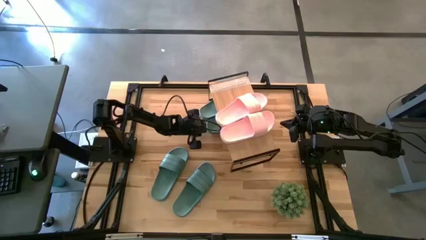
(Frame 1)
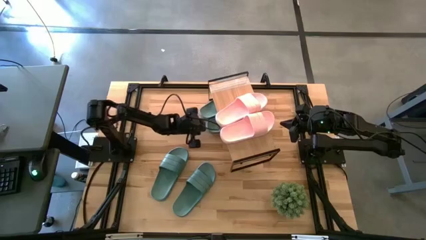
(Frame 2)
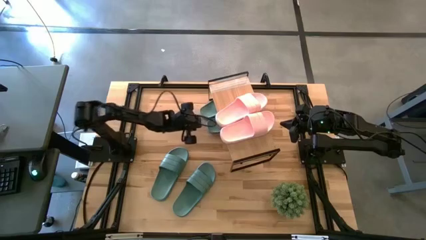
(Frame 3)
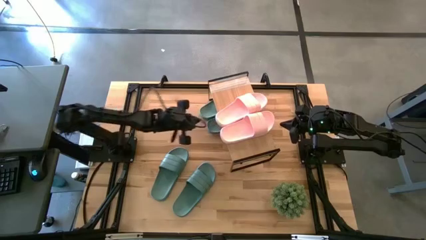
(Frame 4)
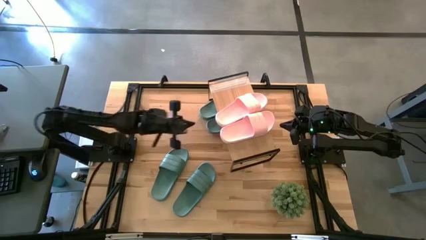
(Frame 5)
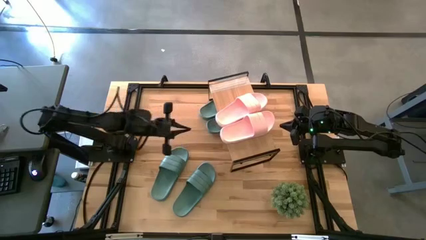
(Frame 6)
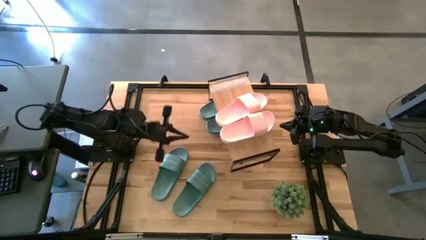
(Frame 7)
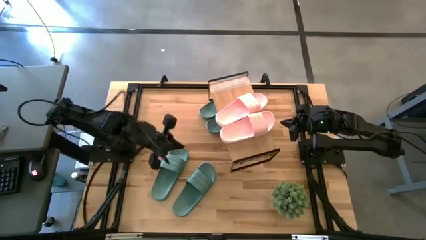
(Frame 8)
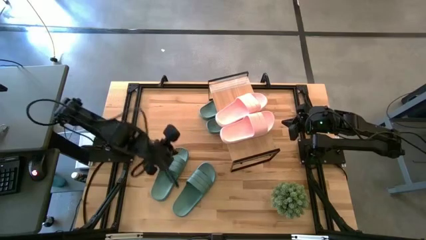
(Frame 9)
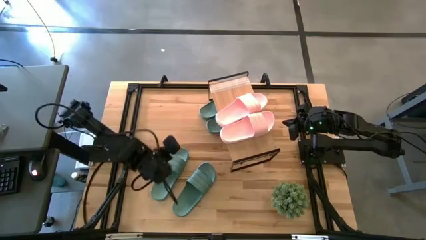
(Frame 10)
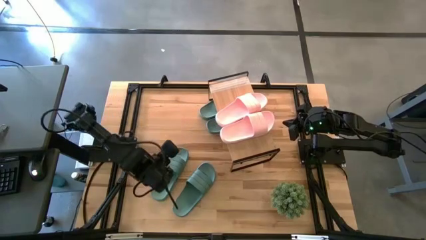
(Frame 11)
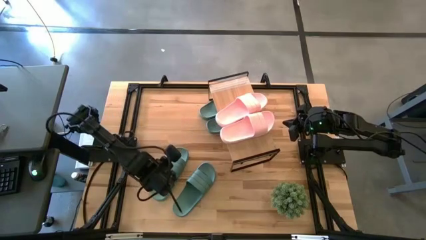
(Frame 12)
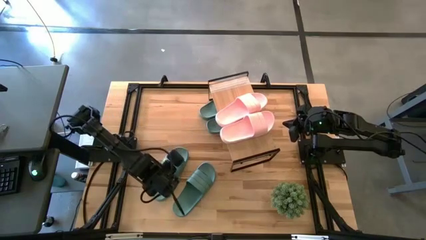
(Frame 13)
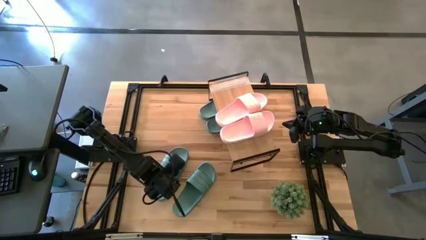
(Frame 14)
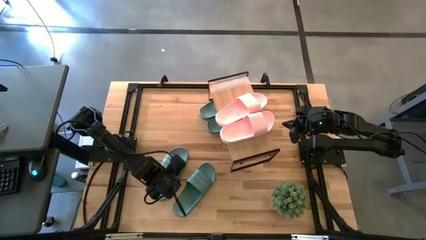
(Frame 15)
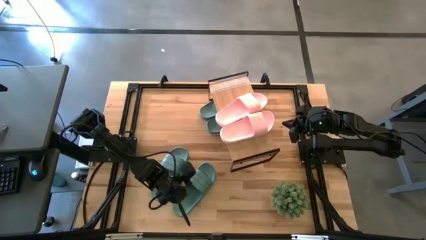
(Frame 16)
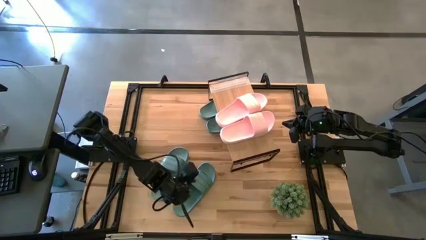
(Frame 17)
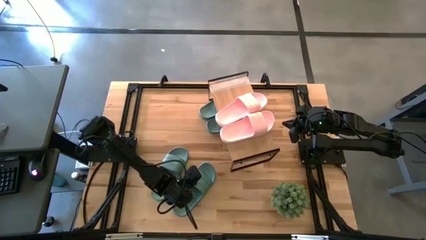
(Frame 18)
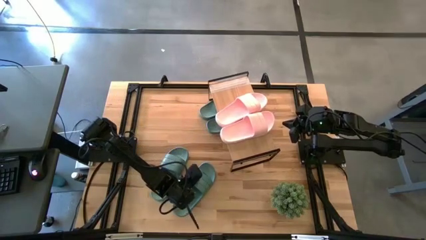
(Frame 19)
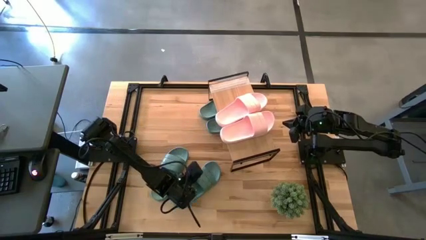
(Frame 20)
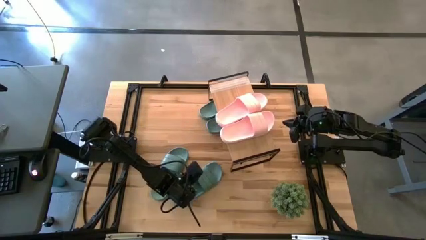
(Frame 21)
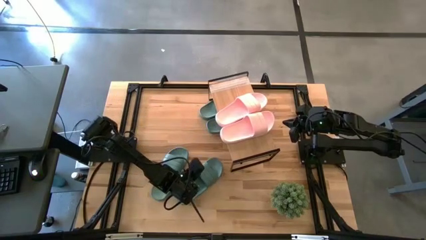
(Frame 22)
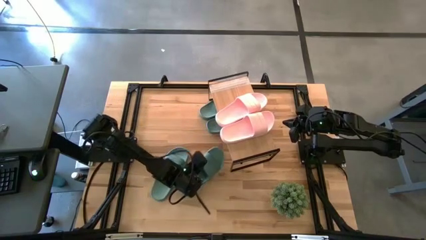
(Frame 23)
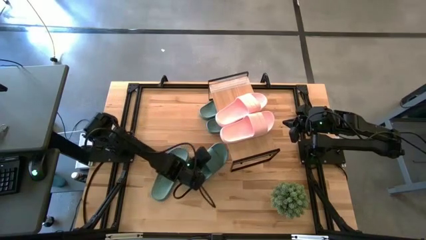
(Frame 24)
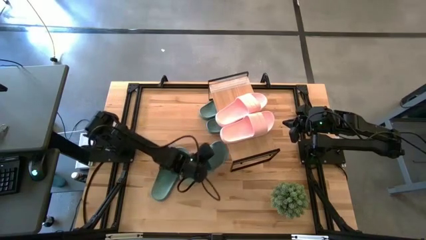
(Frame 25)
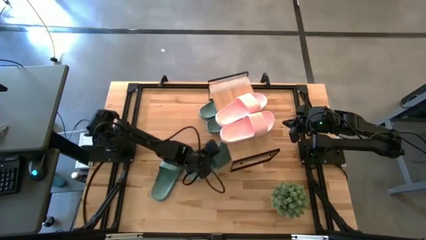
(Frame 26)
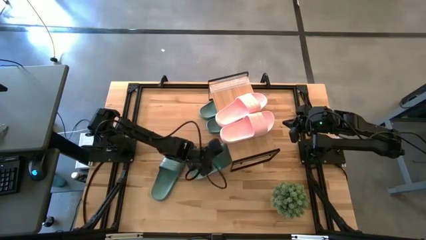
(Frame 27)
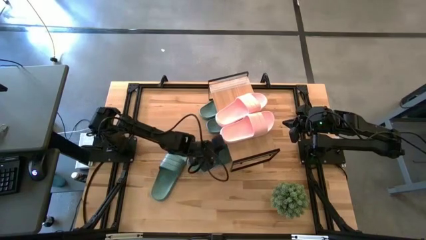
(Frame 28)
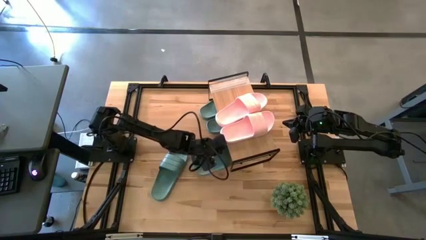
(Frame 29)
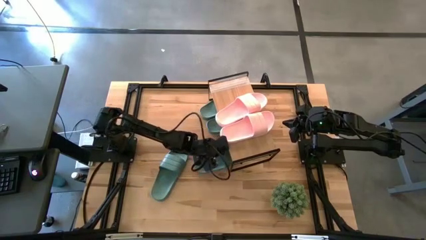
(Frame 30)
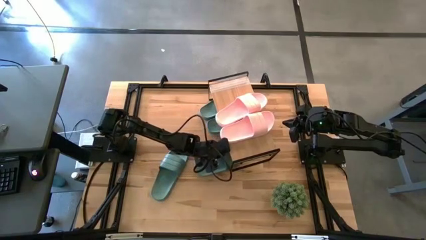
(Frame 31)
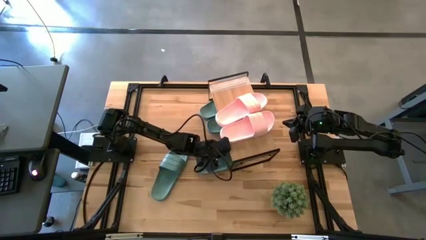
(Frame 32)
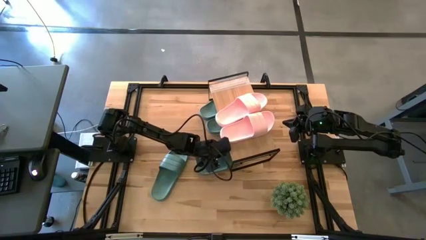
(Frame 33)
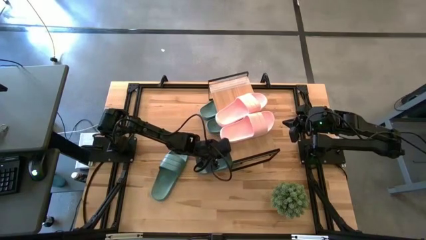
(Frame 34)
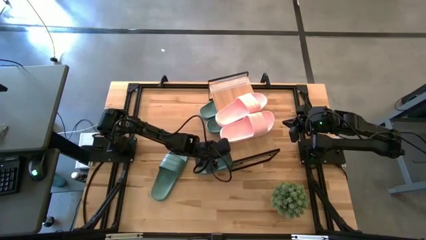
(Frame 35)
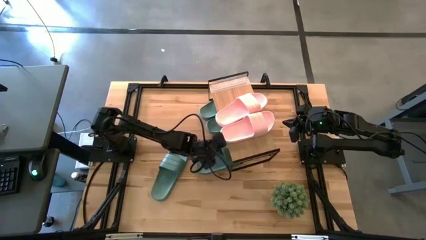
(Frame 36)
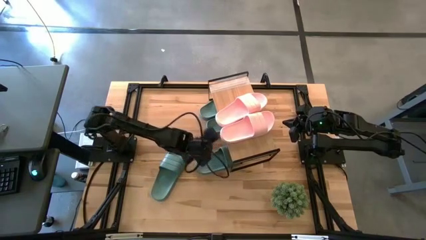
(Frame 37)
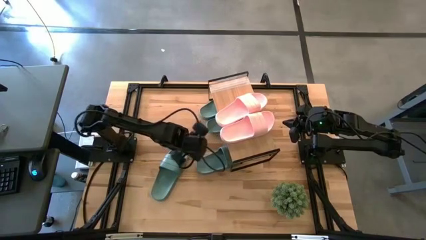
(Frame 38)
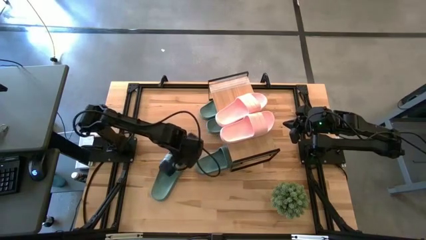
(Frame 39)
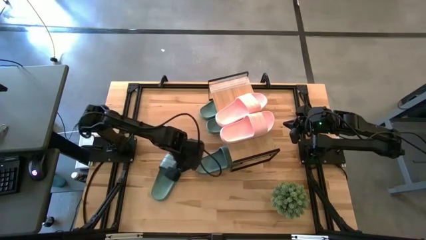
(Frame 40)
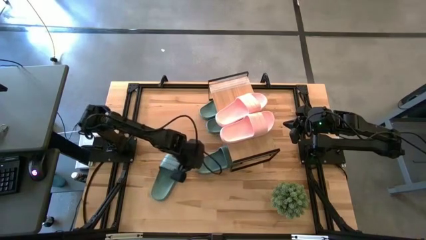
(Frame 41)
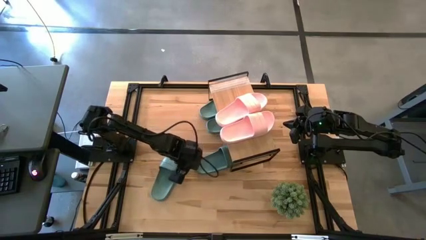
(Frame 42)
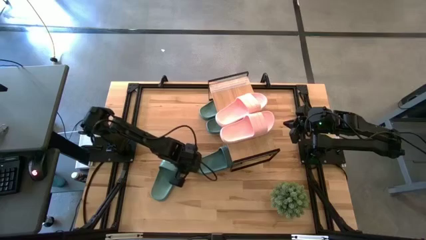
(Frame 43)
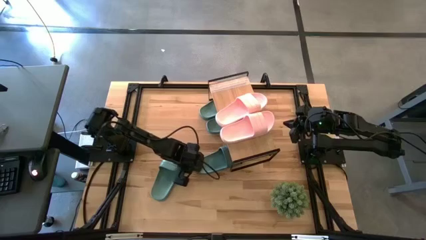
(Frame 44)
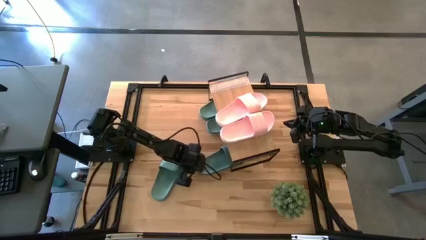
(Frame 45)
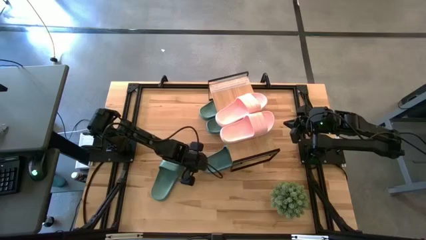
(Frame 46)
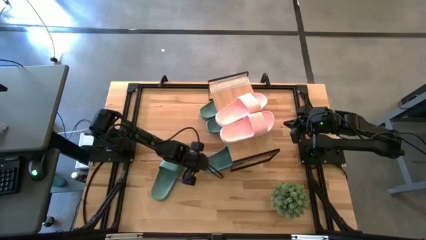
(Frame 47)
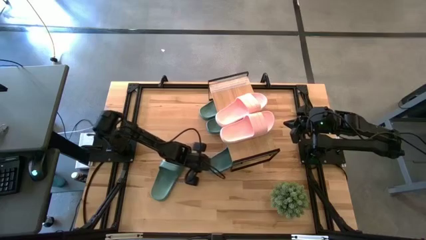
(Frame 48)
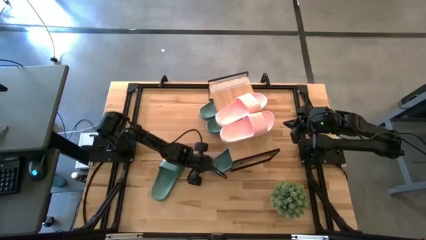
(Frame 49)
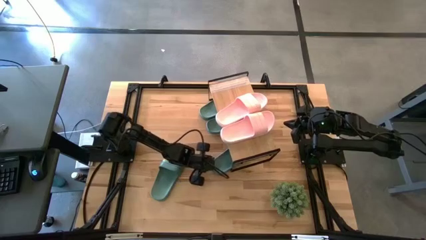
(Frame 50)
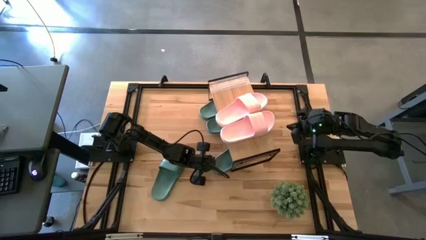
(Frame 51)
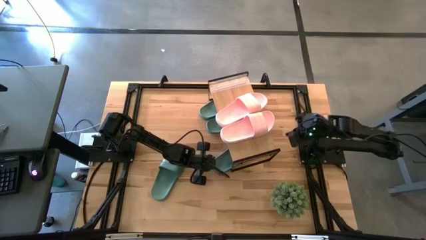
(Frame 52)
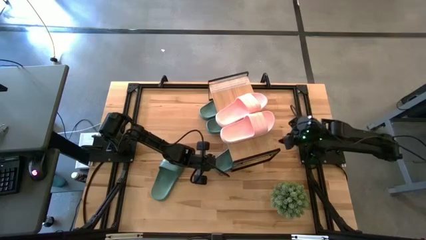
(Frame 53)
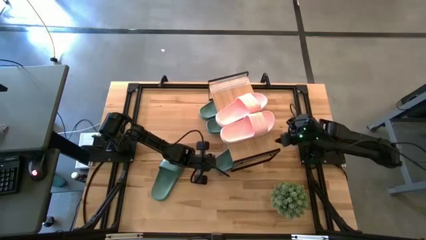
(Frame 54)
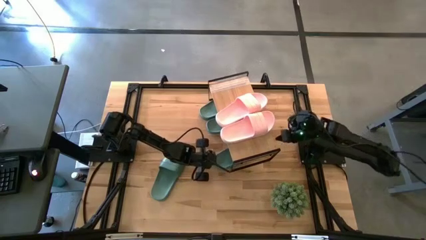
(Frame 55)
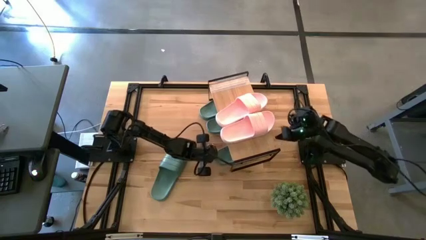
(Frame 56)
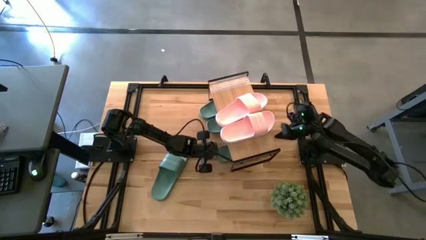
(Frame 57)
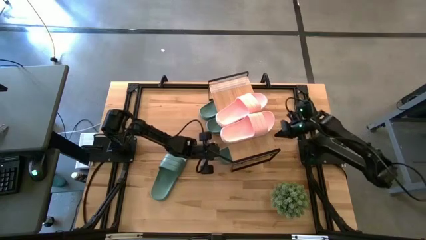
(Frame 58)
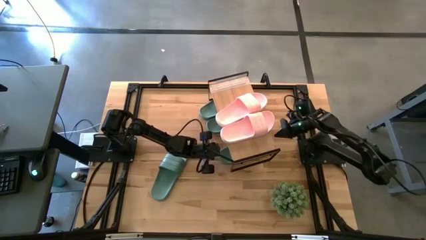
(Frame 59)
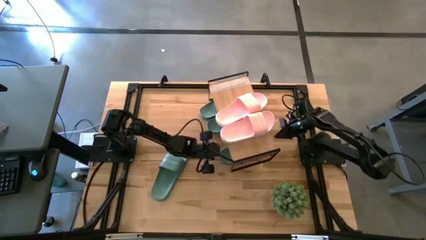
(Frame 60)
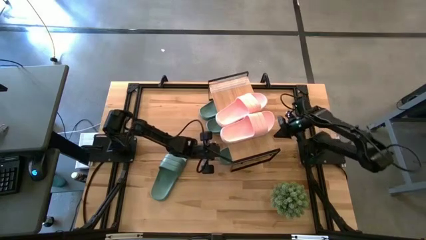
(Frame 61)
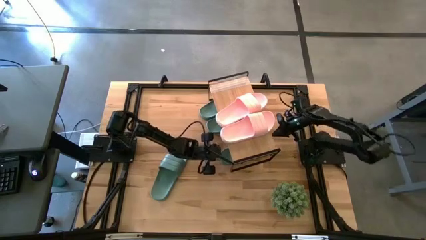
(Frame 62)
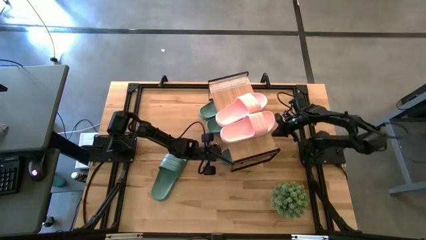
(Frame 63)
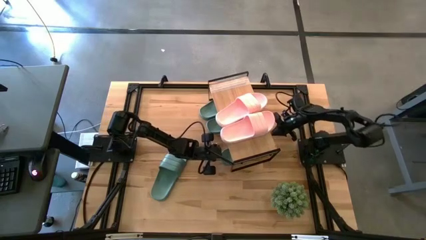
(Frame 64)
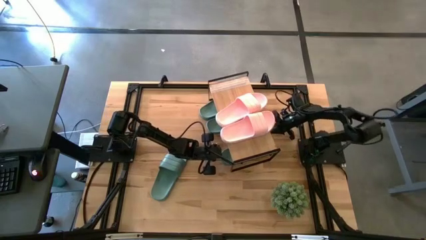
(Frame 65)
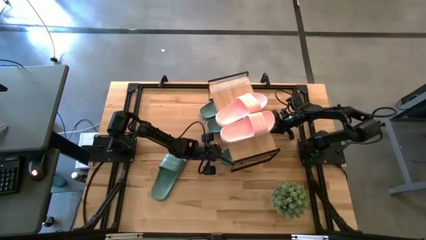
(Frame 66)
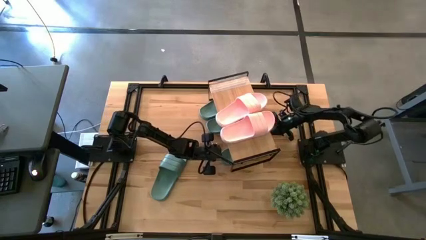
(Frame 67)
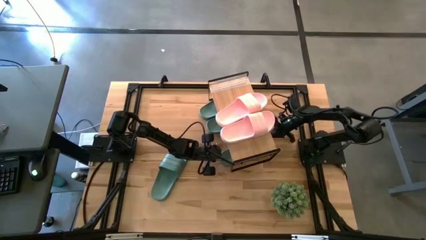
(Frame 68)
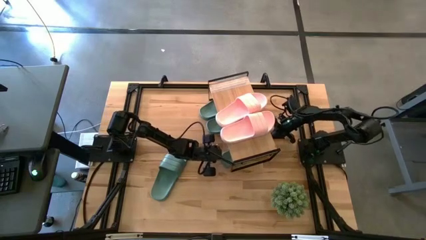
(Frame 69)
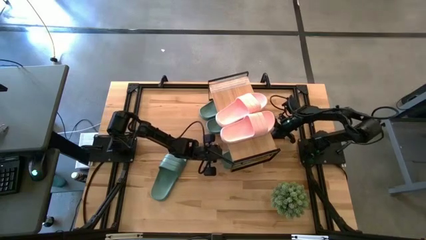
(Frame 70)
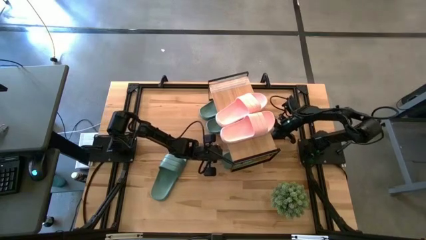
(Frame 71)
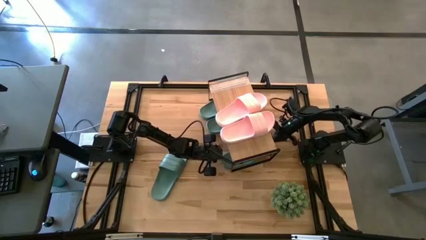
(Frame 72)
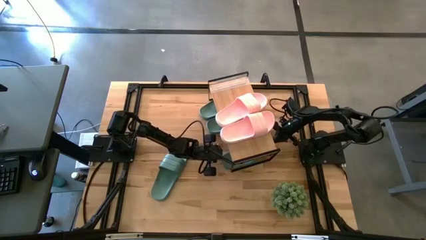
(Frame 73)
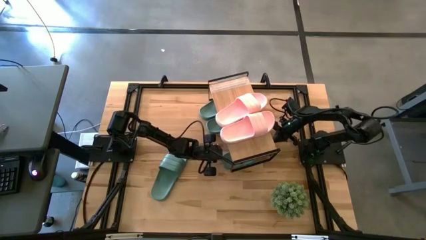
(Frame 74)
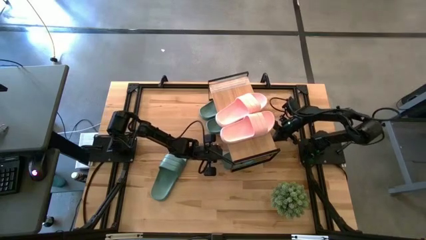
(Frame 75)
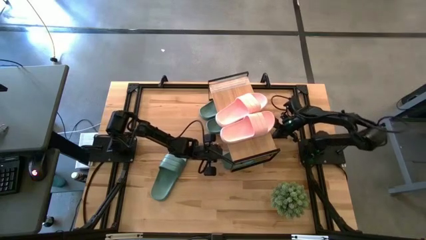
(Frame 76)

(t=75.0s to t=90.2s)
Task: Pick and place slides into the shelf
Put the green slide under the shelf
